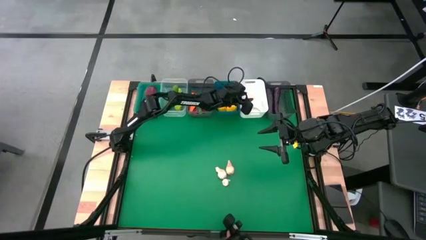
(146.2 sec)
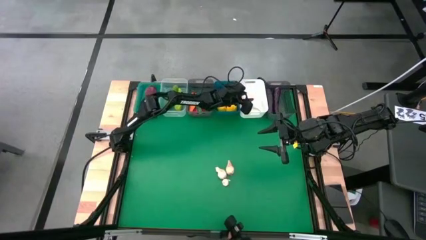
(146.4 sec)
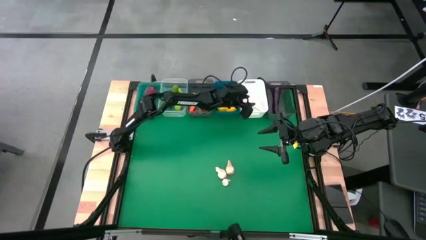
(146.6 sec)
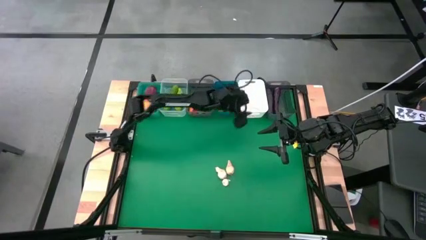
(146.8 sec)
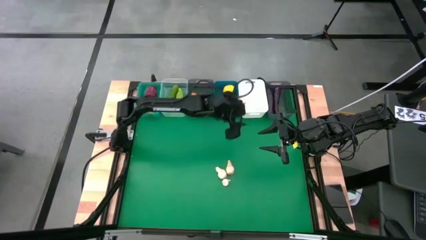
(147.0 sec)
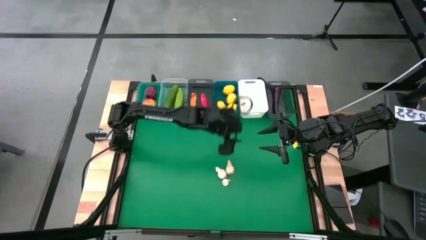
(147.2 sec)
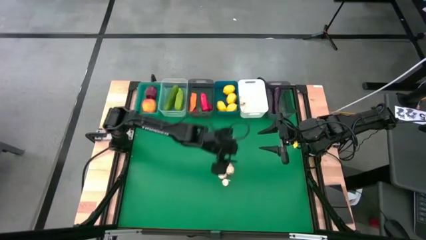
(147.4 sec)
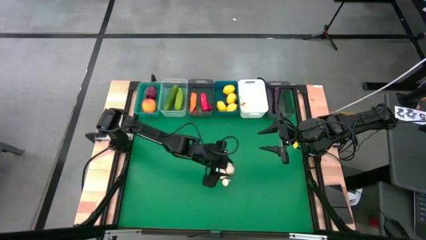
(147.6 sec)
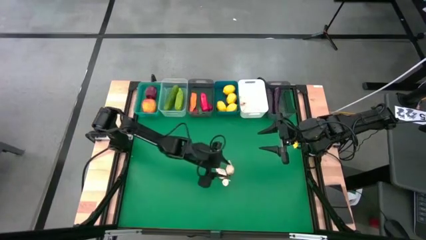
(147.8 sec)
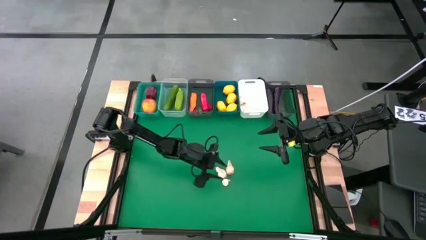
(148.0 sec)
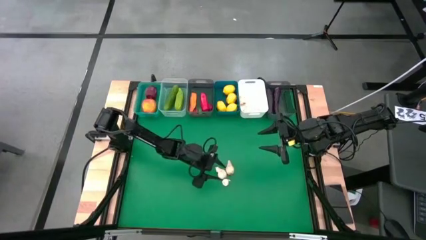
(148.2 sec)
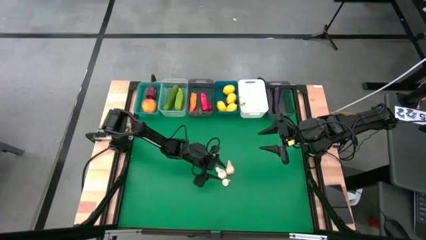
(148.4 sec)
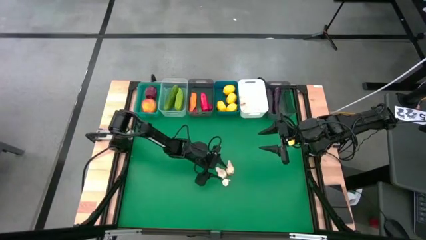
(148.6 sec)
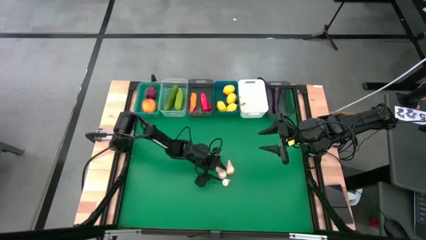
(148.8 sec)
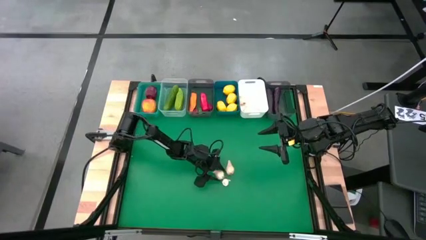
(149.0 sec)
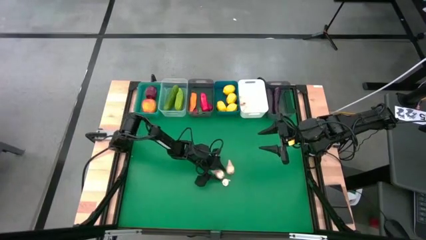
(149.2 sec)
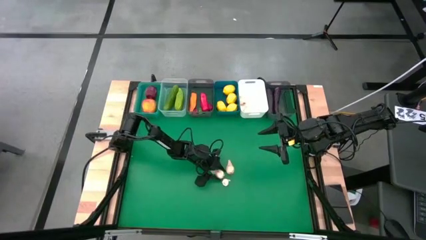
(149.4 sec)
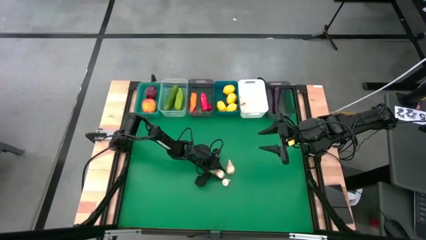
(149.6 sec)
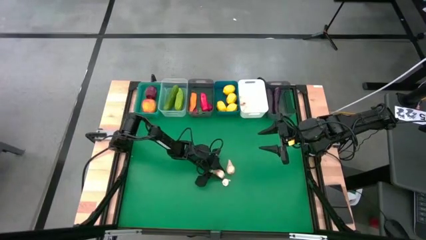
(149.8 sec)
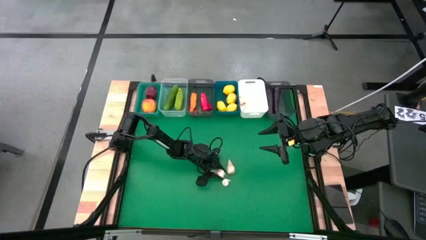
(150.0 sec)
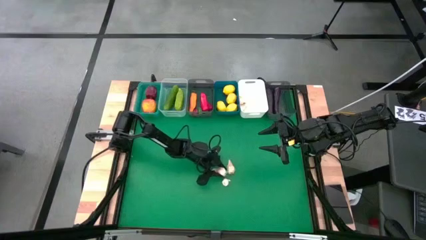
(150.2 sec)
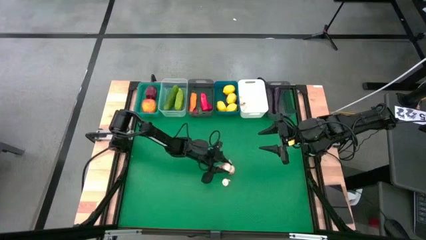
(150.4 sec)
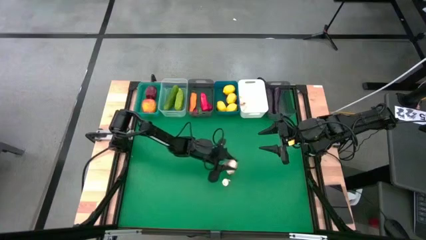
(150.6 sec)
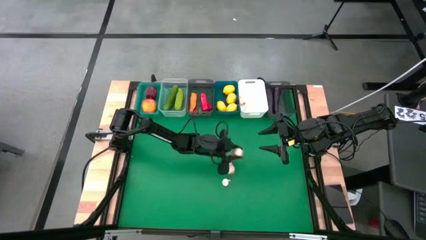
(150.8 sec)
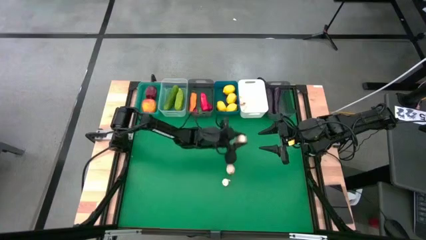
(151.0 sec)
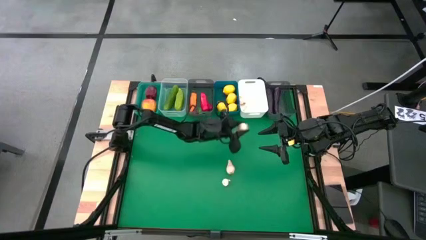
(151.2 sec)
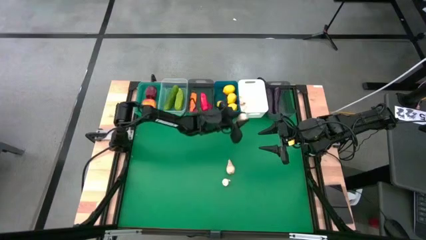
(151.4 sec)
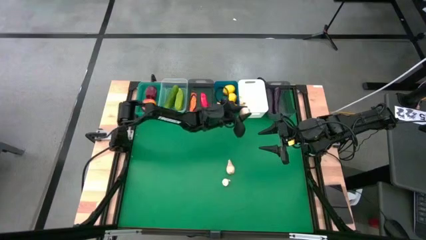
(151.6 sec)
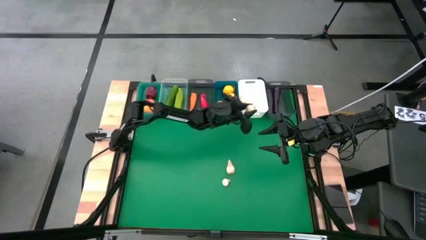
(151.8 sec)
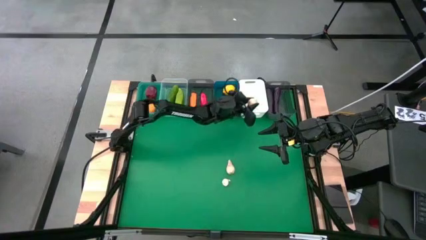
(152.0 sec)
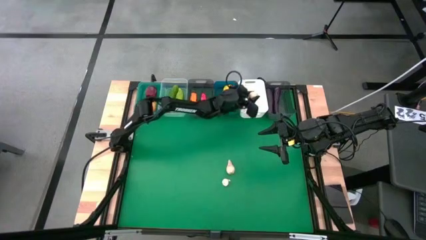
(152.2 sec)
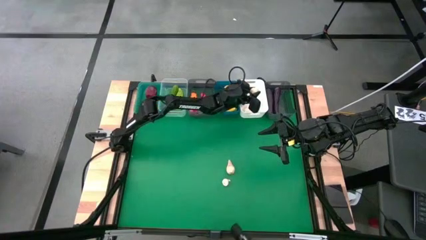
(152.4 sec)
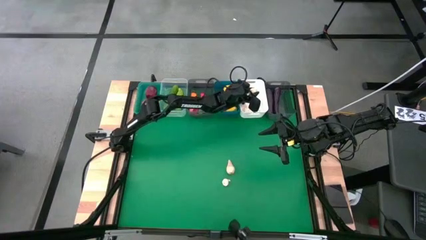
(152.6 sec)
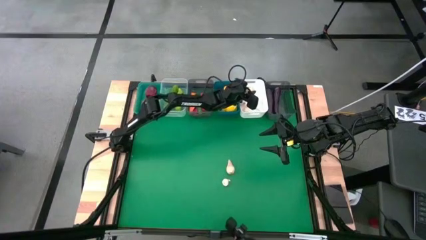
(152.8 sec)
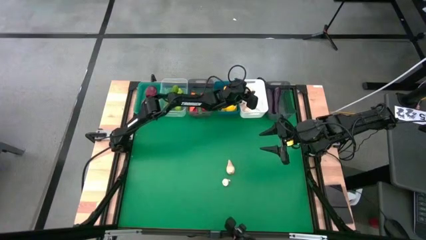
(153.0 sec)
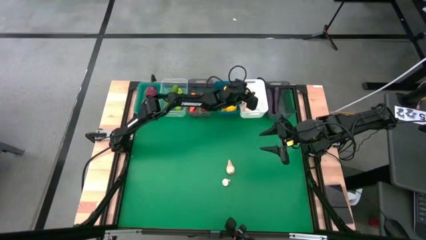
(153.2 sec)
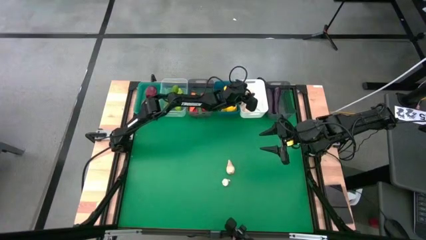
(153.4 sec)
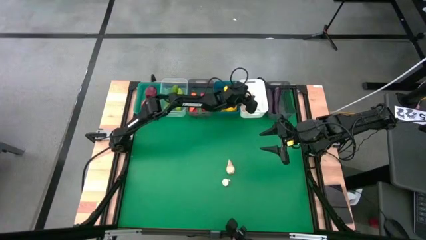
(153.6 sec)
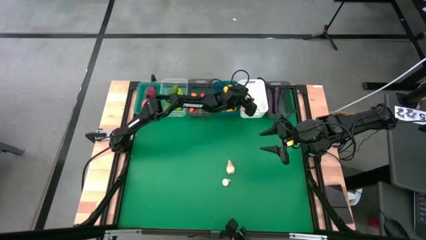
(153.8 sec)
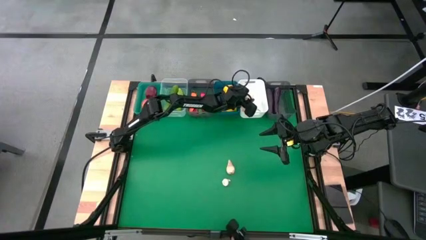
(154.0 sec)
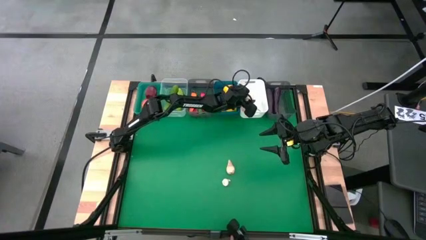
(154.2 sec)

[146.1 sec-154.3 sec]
Task: Sort produce into baskets
Put the garlic into the white bin

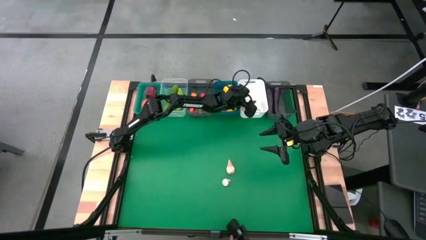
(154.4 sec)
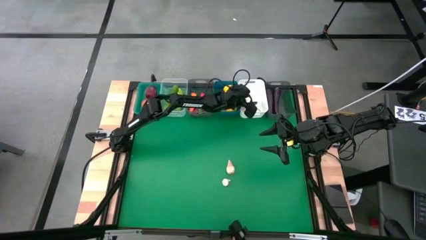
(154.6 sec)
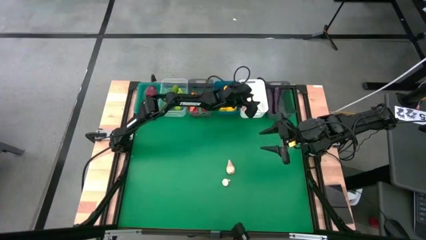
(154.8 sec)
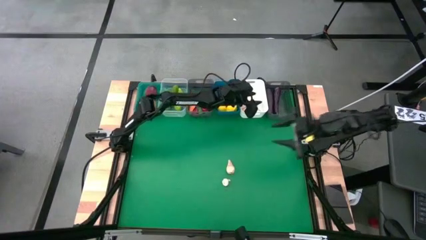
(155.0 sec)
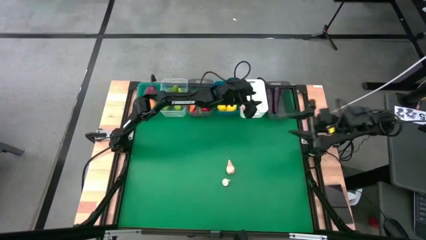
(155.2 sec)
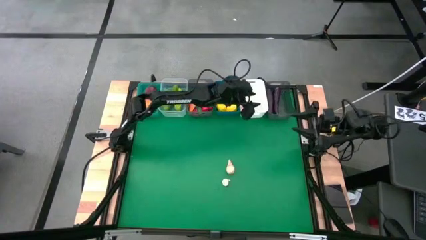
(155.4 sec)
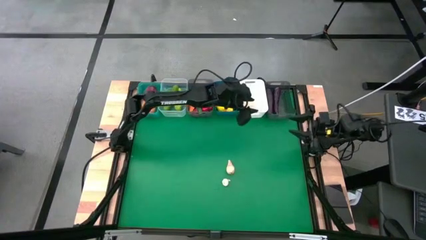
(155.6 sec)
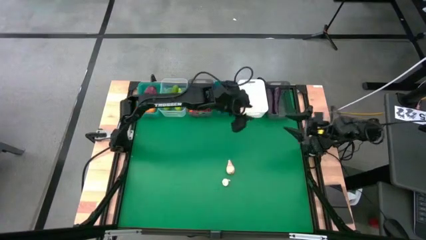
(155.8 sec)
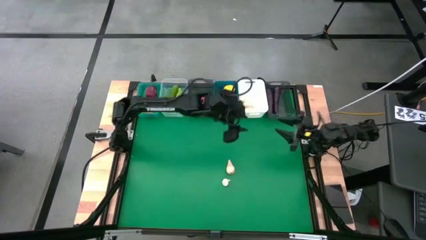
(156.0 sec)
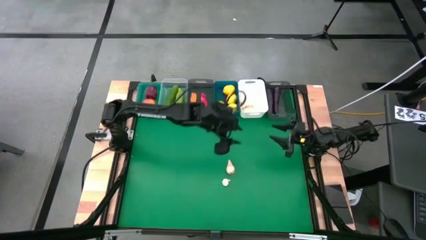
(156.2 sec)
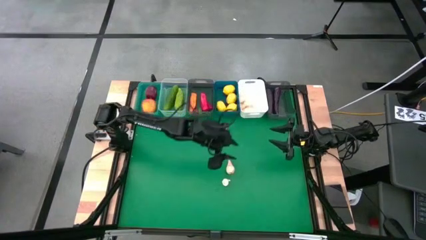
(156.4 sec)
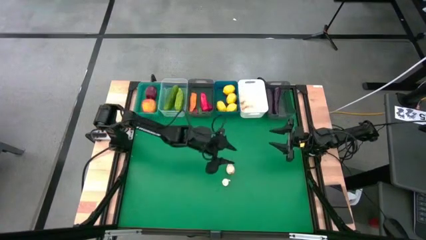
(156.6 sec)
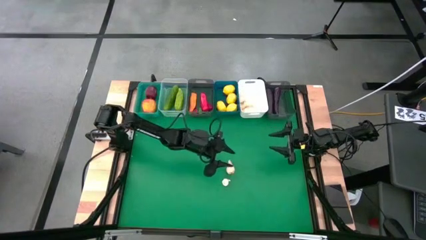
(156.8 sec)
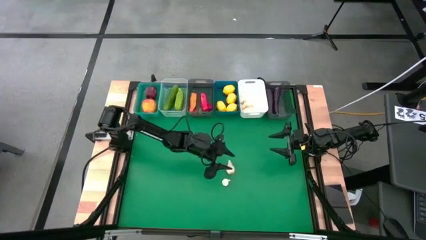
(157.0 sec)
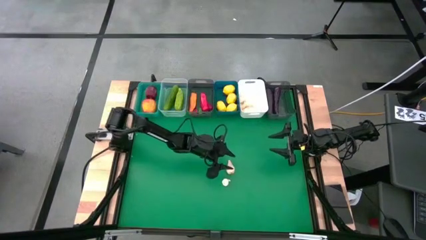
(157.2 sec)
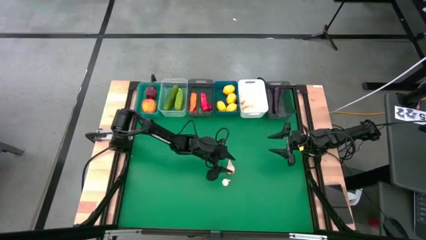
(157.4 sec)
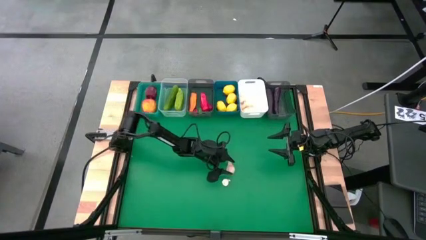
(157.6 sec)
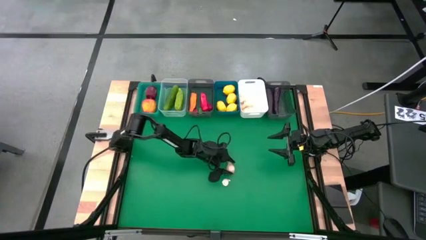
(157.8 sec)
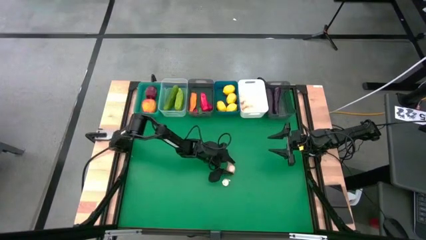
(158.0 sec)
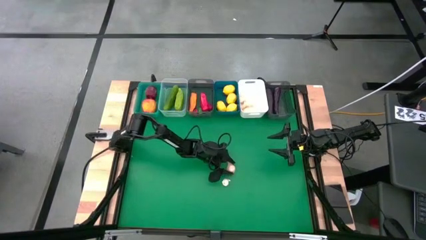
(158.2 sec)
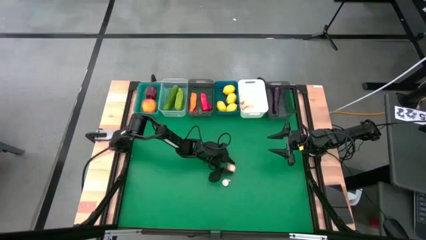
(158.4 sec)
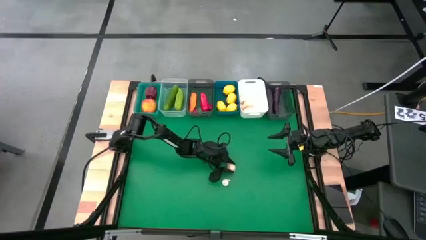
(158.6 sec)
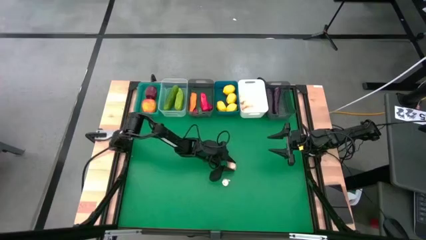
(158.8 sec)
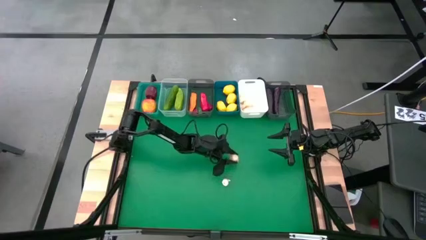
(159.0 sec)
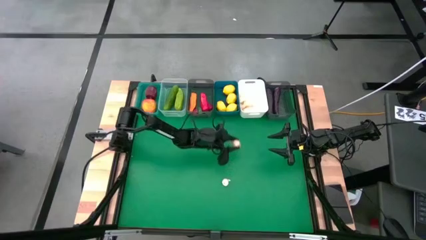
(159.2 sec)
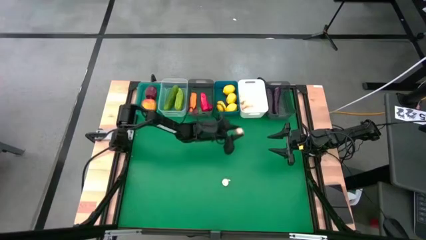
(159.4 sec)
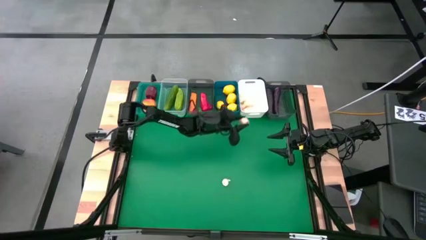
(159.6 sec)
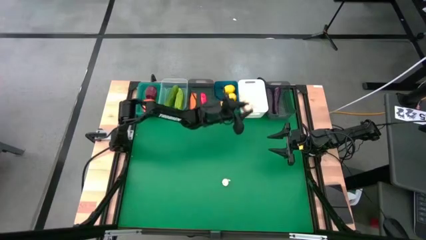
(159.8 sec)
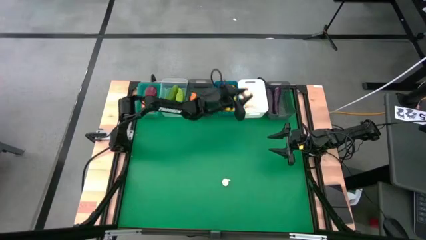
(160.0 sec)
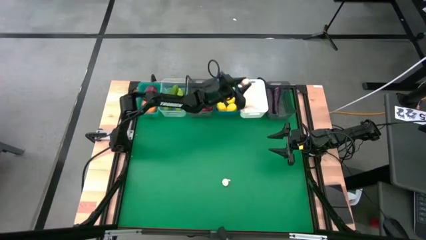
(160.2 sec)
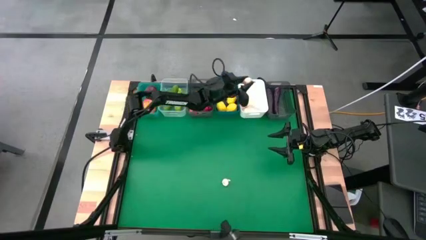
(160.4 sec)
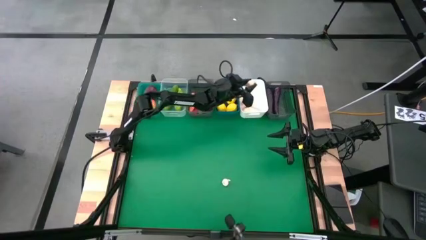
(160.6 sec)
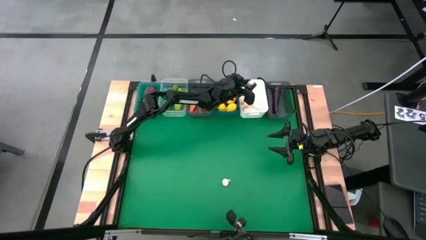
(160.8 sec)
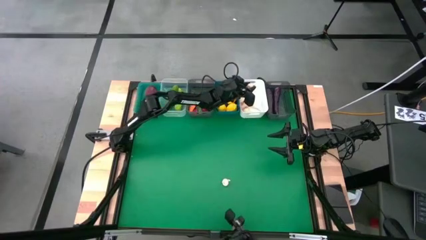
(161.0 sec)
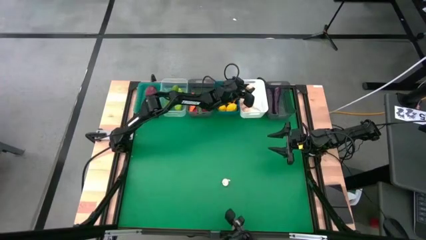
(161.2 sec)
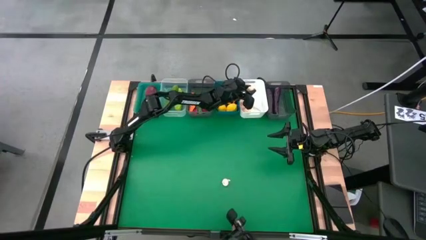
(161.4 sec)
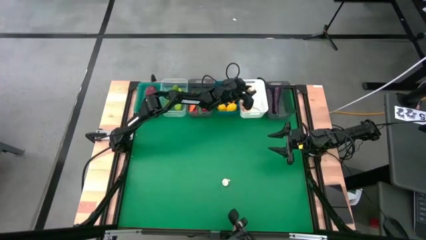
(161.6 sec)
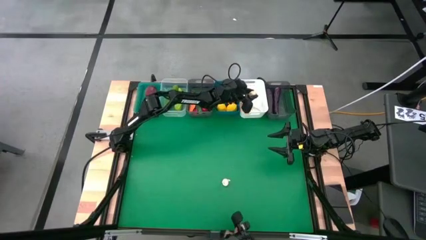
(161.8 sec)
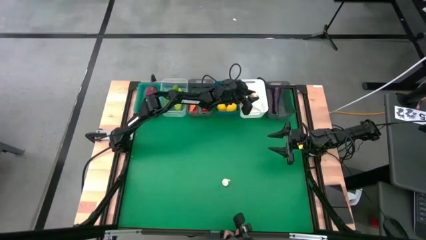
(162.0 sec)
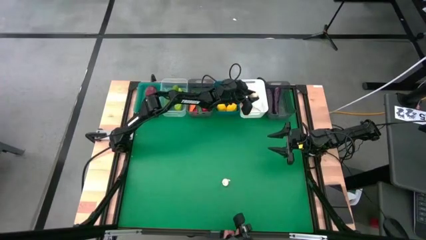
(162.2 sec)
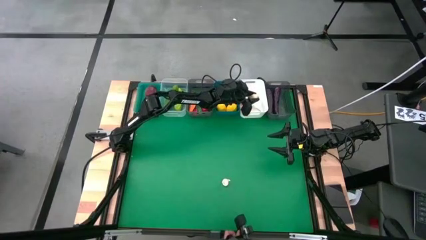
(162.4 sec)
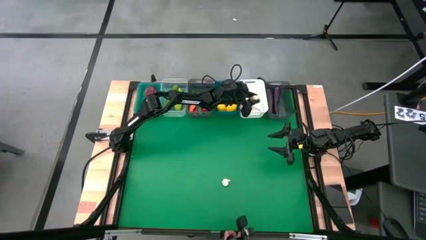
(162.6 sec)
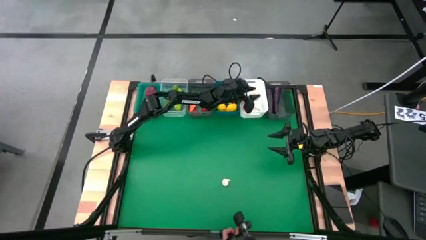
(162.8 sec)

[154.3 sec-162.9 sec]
Put the garlic into the white bin
